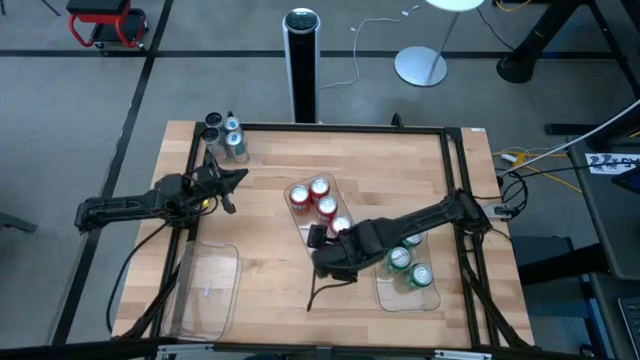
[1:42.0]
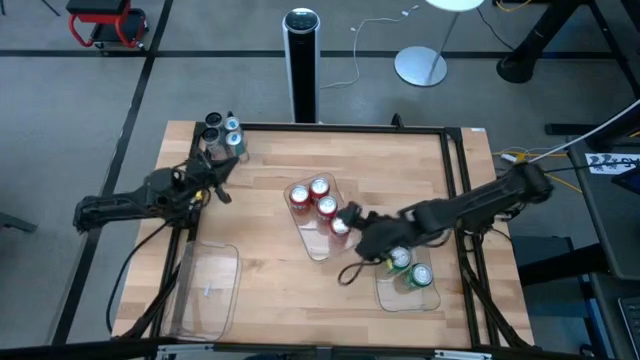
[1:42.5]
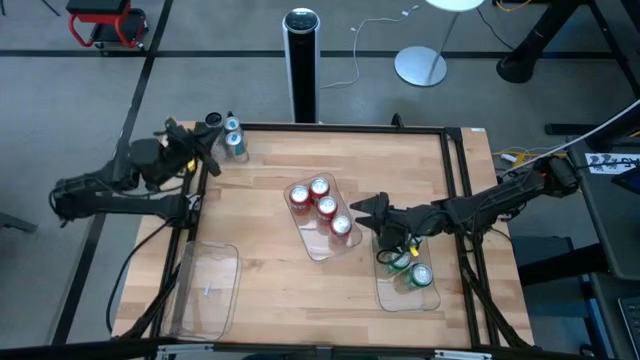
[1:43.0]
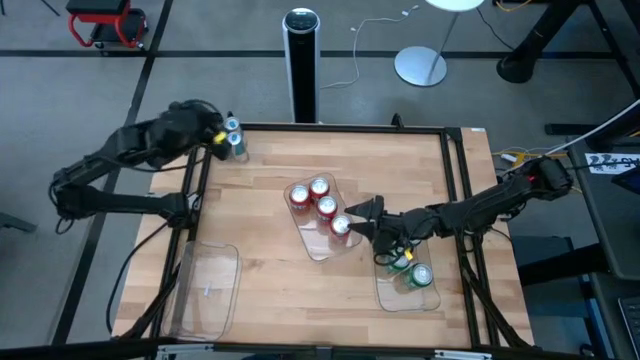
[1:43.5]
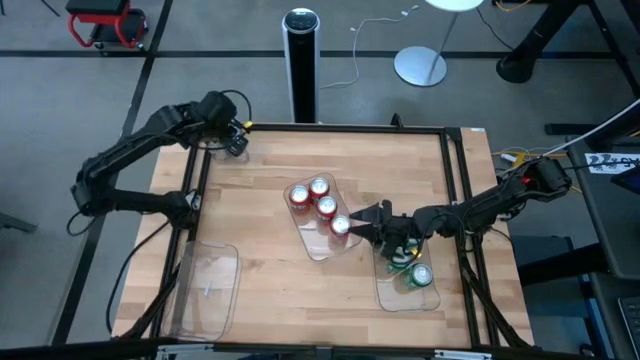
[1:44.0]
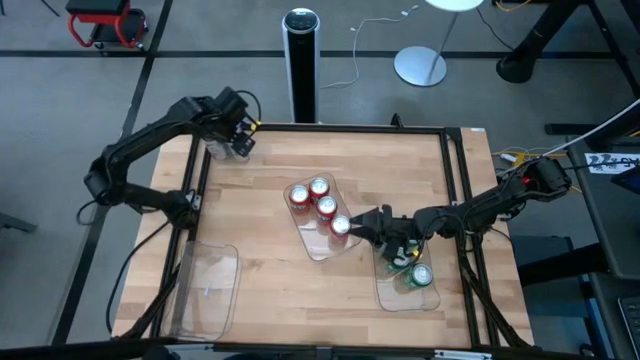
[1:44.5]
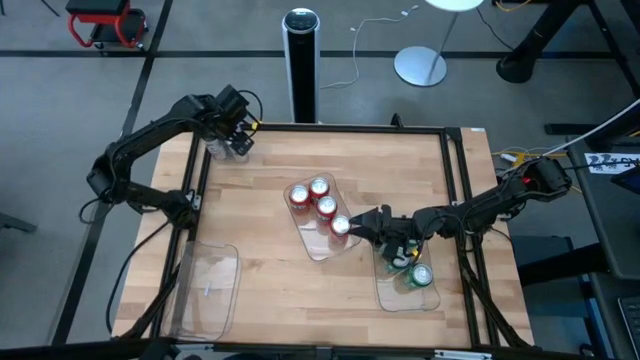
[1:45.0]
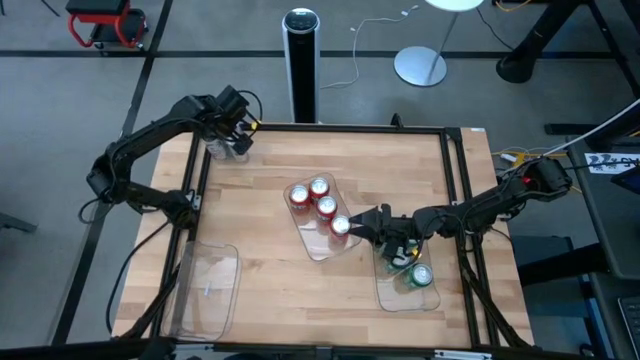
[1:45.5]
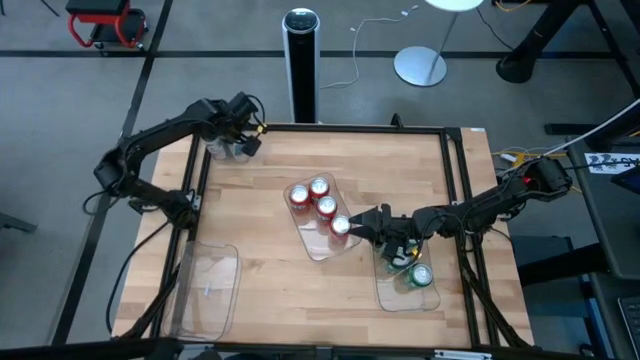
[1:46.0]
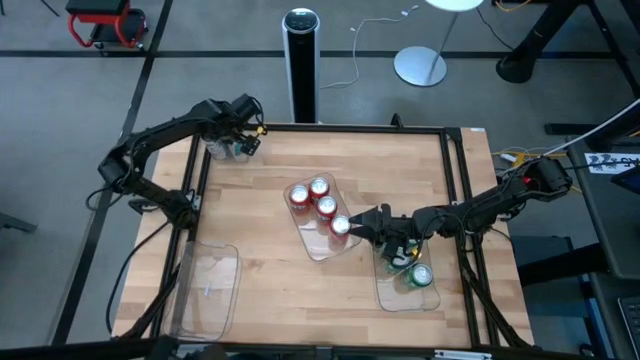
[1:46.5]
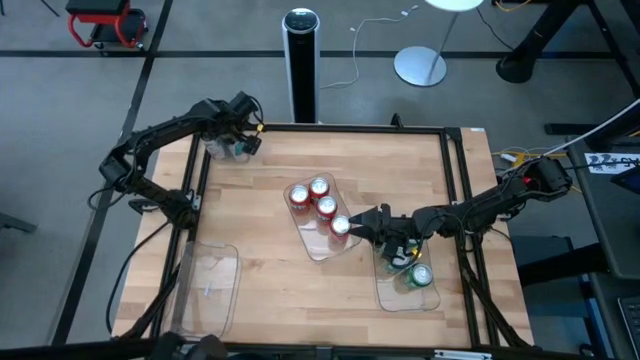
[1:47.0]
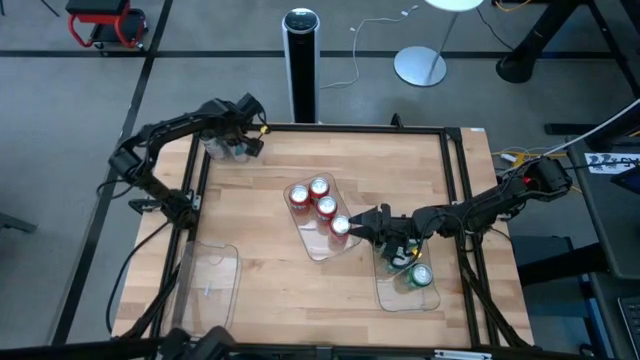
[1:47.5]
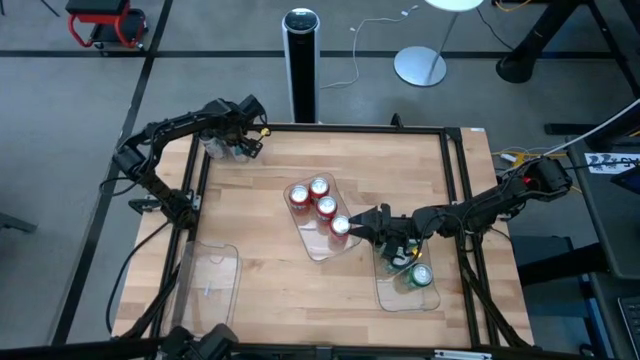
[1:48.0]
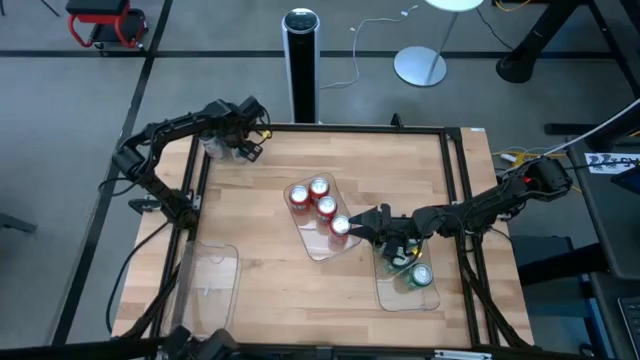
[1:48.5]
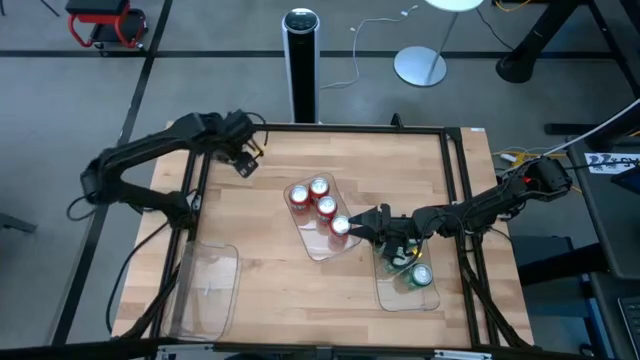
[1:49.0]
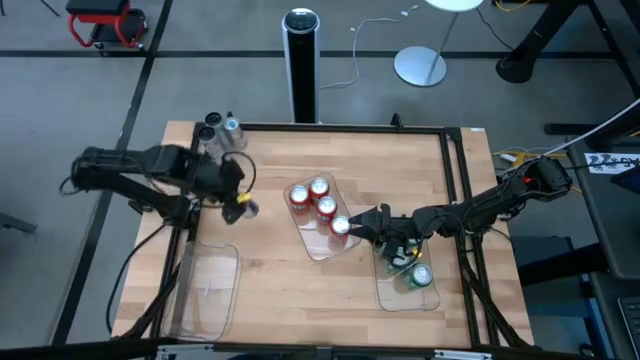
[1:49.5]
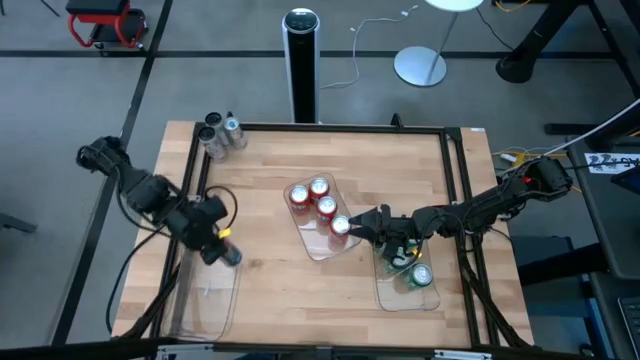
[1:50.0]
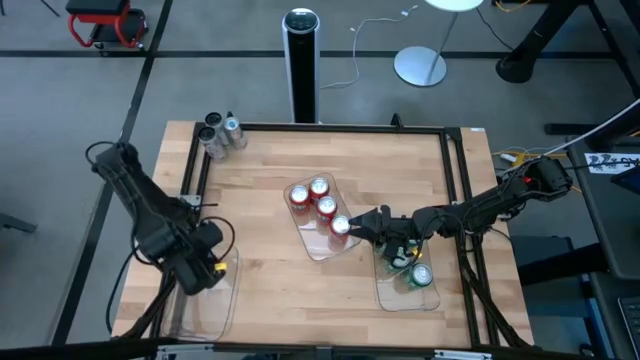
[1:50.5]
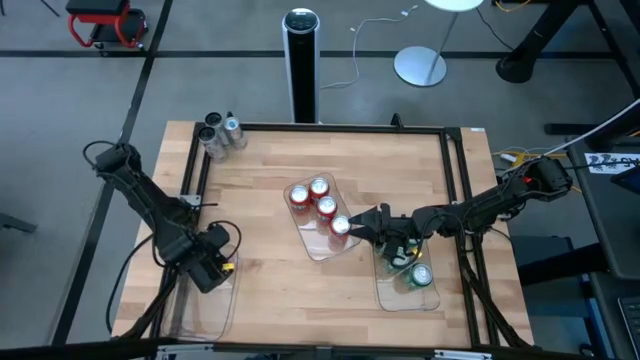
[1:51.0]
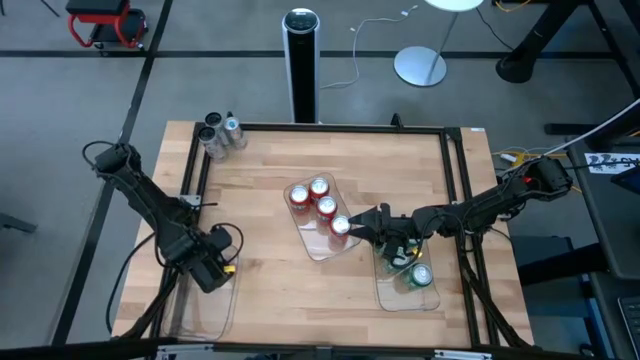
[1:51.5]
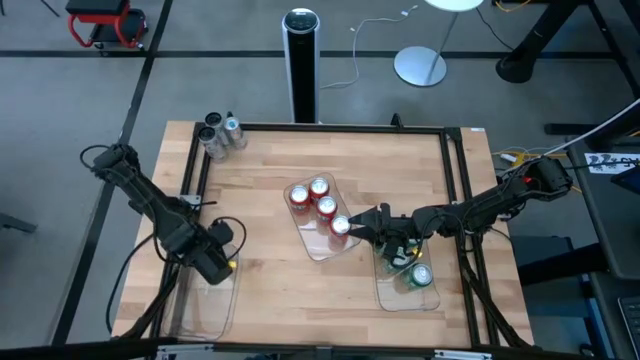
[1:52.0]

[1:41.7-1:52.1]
Task: Sort soda cans
Put the bottom blue soda can into the left transparent bin

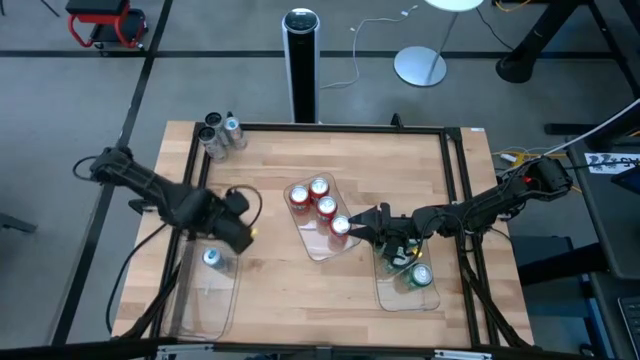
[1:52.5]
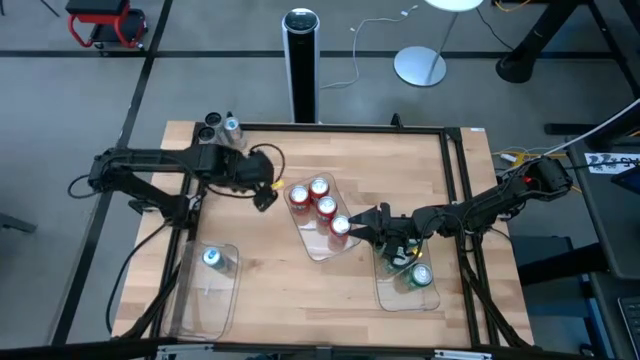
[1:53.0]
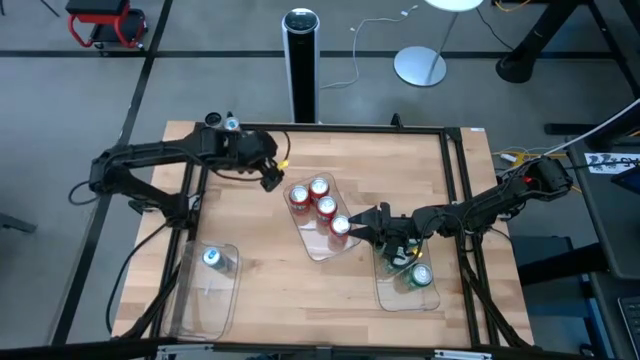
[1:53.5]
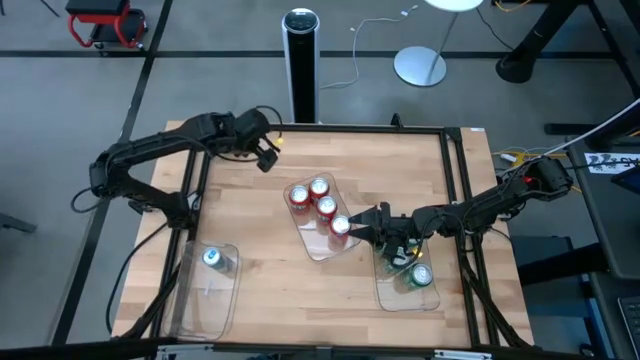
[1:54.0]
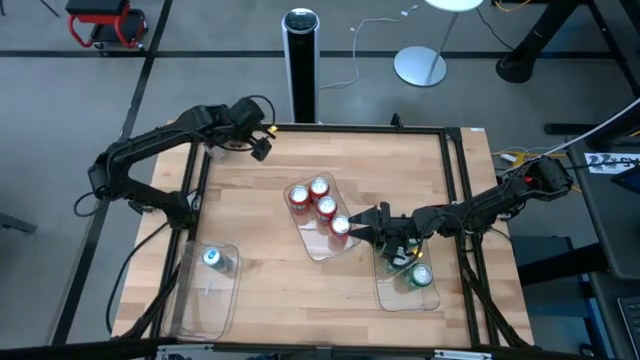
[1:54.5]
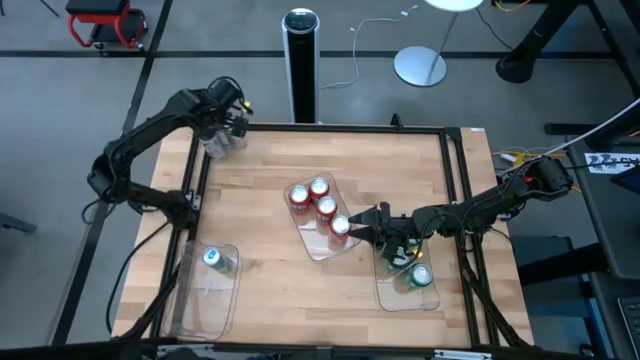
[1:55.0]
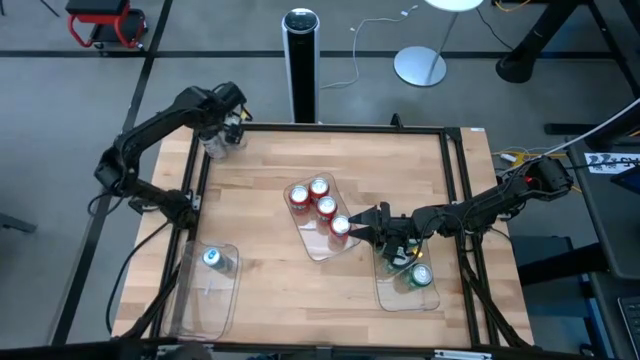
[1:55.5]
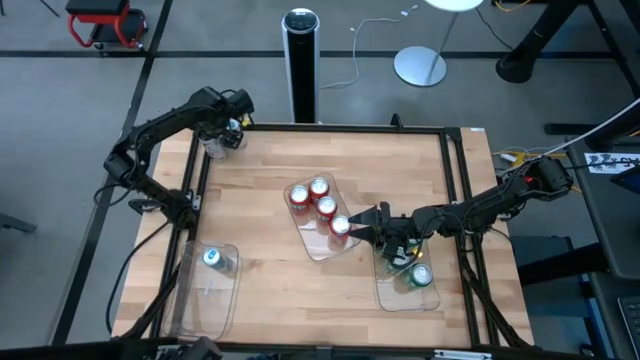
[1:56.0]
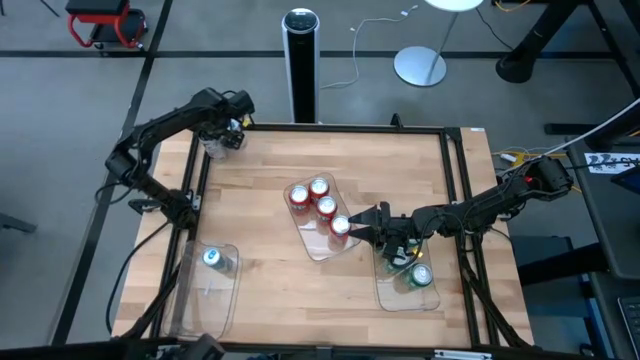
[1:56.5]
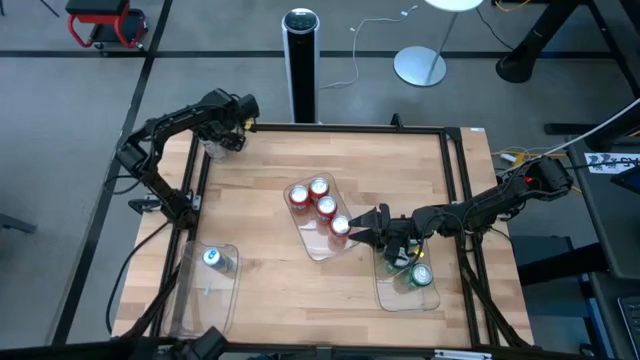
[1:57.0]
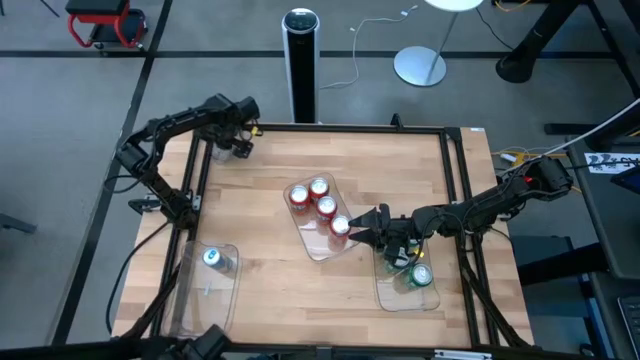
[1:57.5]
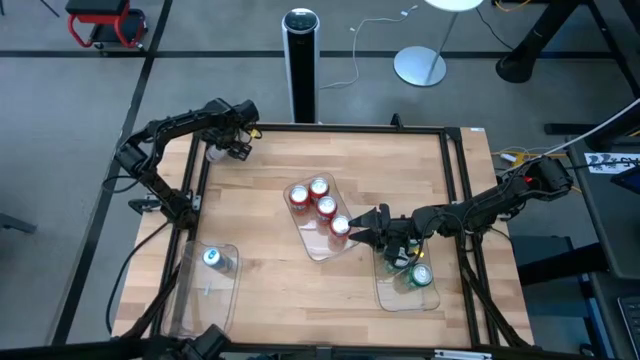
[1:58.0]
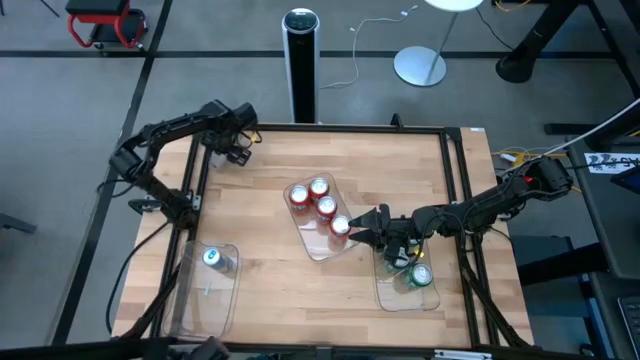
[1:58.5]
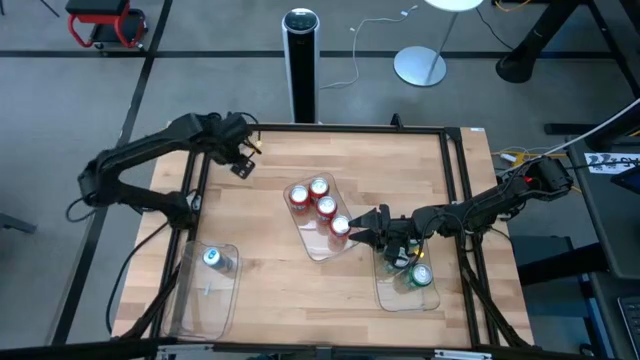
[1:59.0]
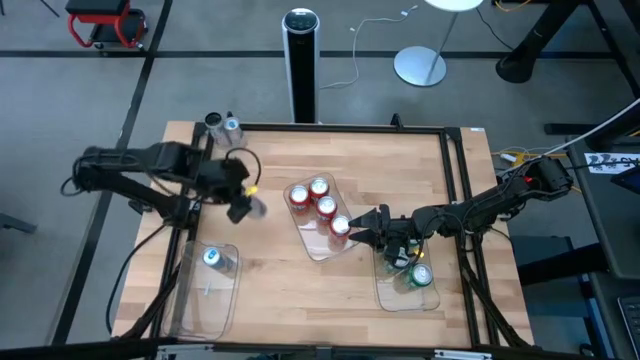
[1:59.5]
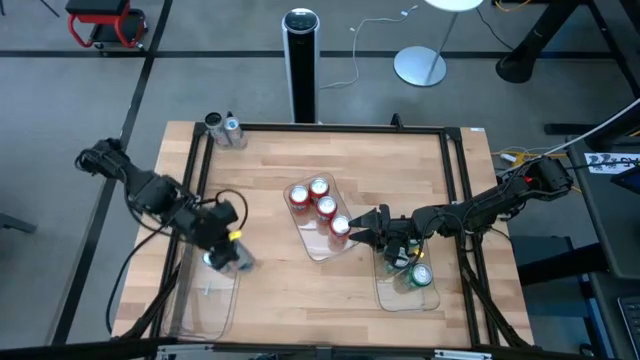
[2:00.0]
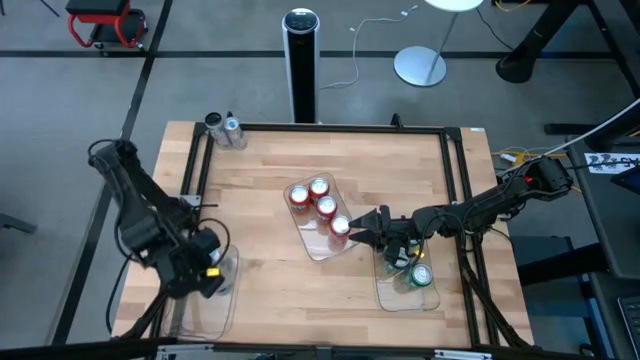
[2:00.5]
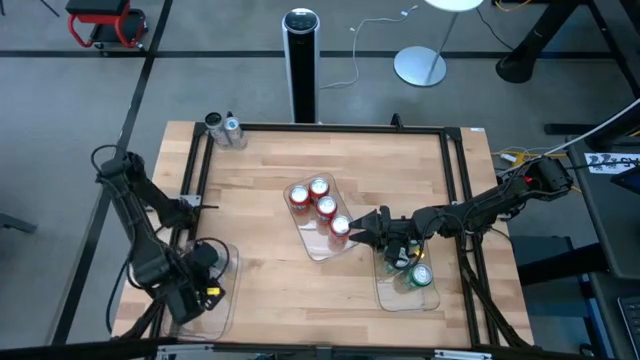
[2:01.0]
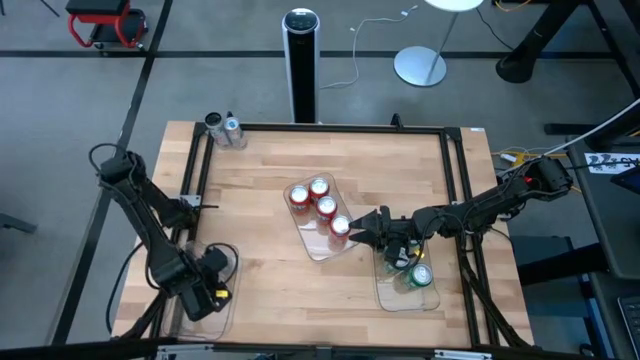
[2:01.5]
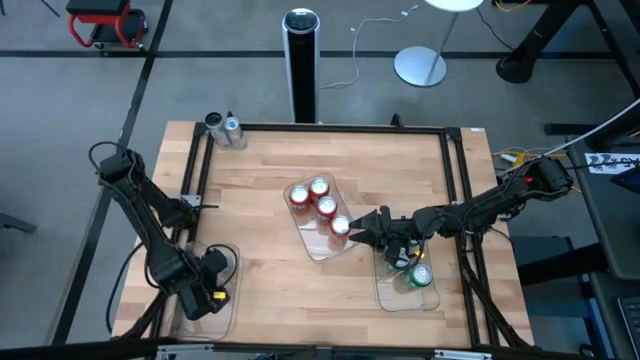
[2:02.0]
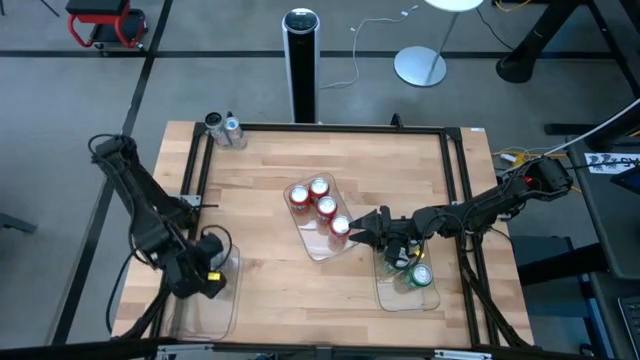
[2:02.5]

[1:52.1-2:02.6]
Put the bottom white-pink soda can into the left transparent bin
